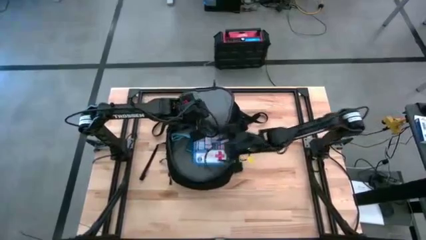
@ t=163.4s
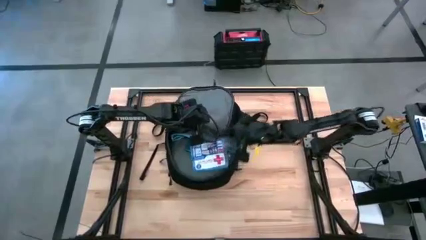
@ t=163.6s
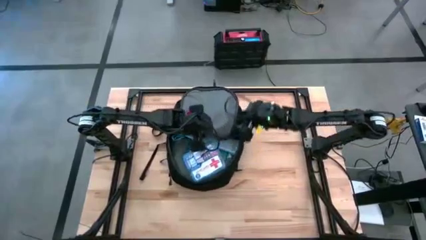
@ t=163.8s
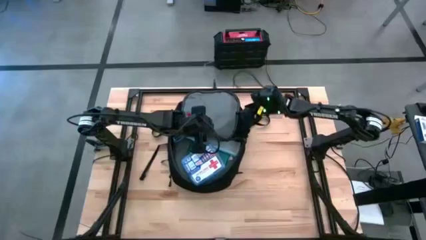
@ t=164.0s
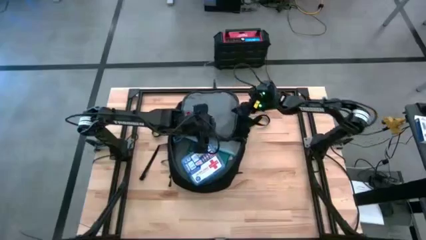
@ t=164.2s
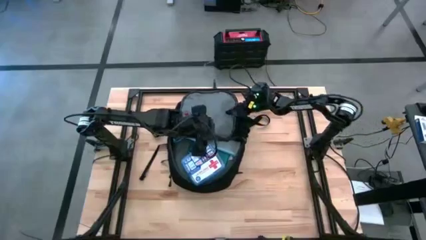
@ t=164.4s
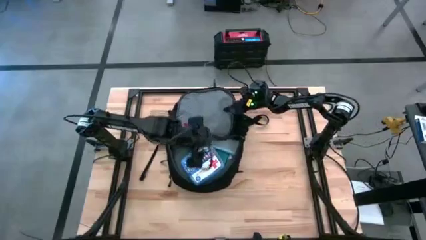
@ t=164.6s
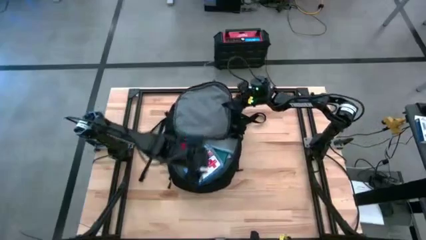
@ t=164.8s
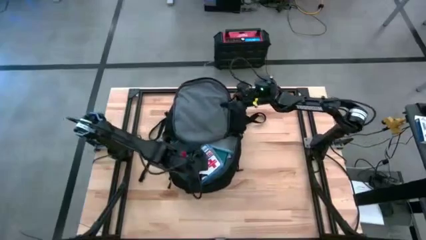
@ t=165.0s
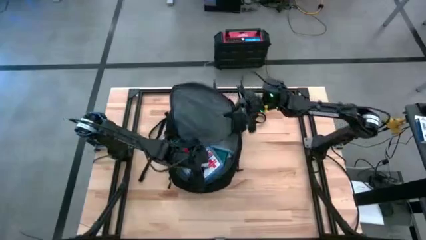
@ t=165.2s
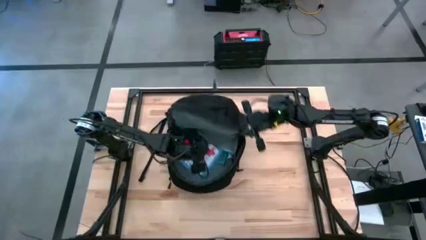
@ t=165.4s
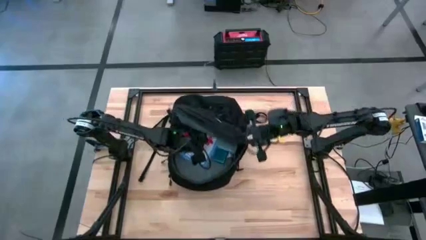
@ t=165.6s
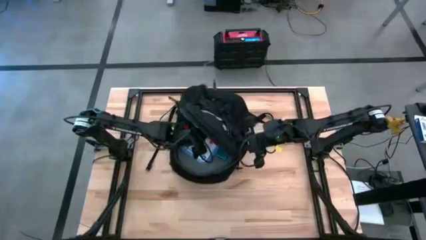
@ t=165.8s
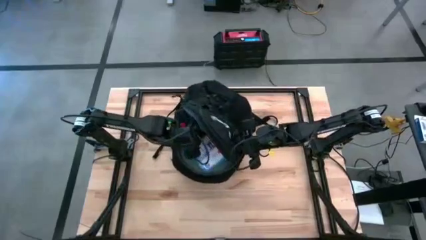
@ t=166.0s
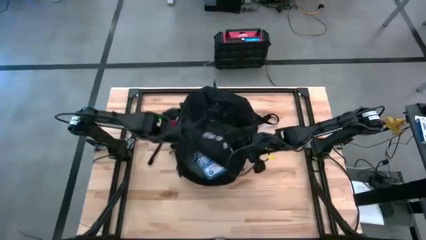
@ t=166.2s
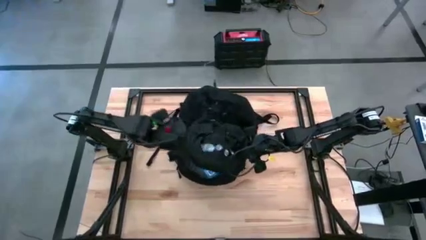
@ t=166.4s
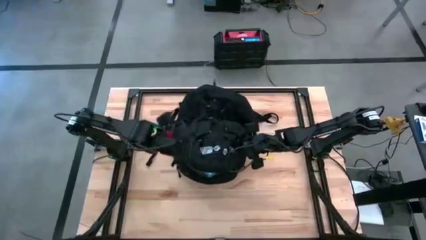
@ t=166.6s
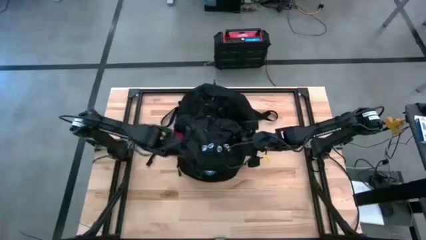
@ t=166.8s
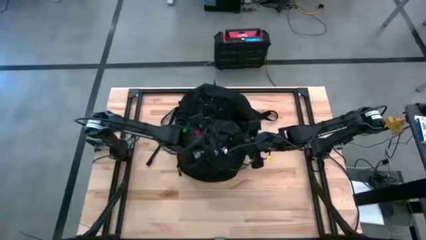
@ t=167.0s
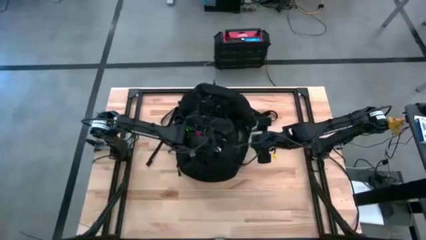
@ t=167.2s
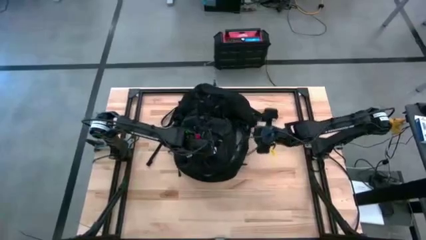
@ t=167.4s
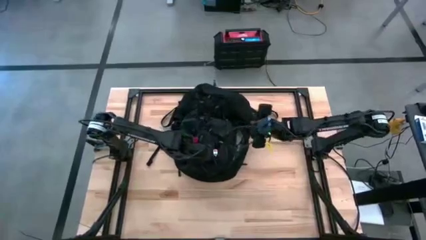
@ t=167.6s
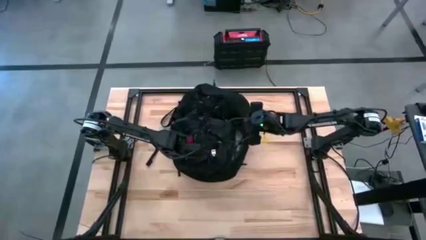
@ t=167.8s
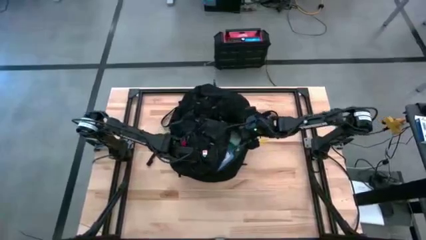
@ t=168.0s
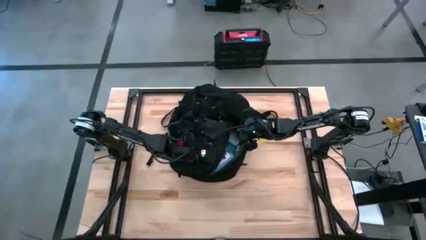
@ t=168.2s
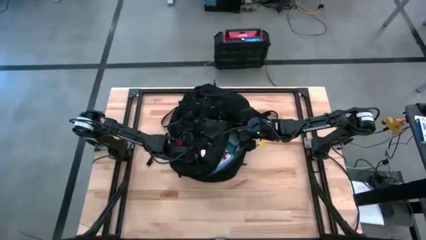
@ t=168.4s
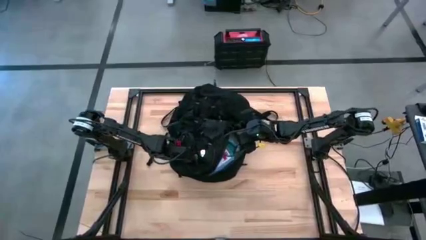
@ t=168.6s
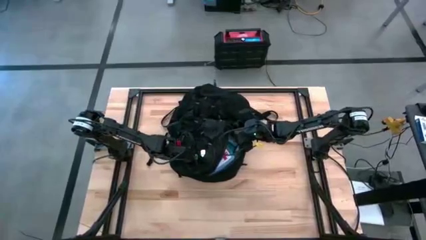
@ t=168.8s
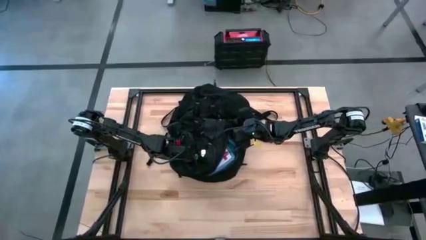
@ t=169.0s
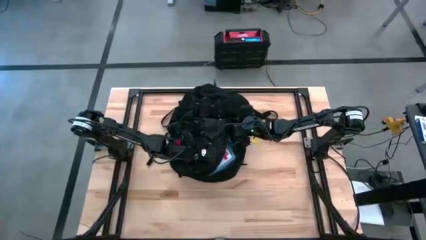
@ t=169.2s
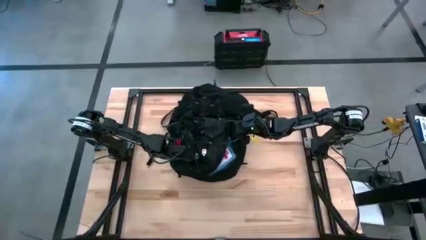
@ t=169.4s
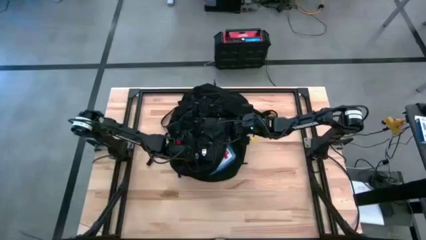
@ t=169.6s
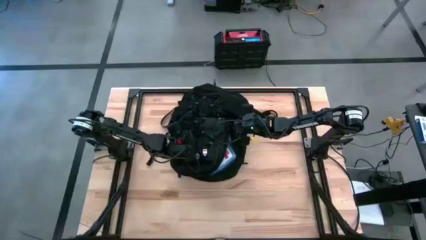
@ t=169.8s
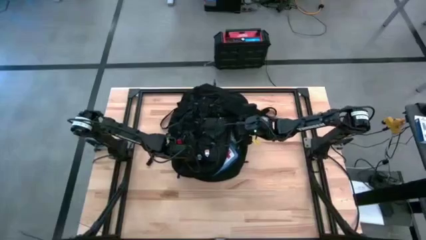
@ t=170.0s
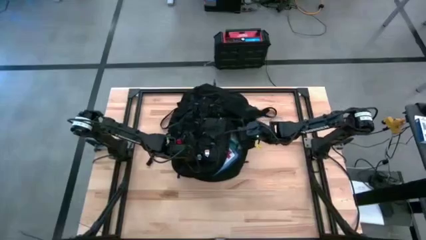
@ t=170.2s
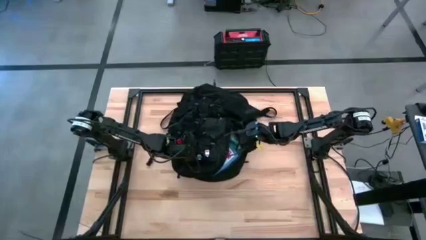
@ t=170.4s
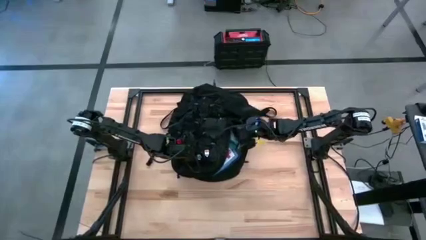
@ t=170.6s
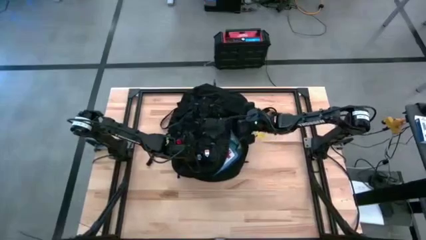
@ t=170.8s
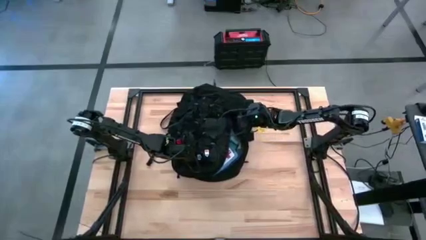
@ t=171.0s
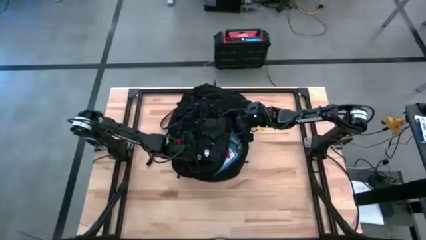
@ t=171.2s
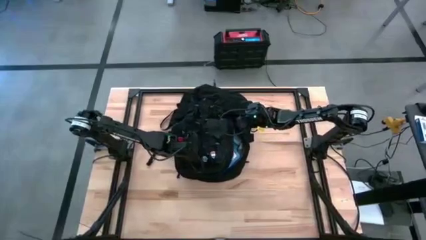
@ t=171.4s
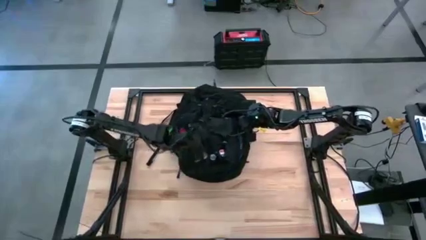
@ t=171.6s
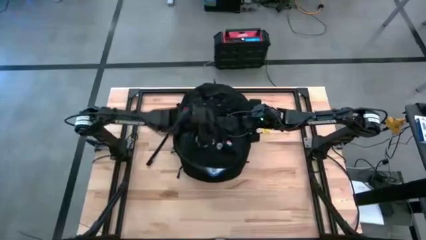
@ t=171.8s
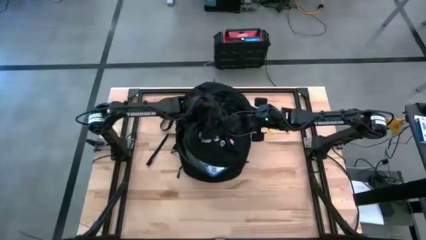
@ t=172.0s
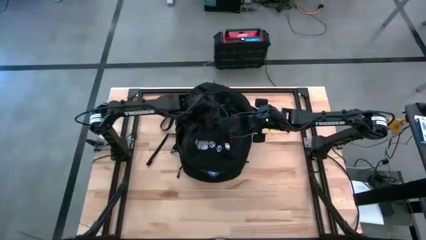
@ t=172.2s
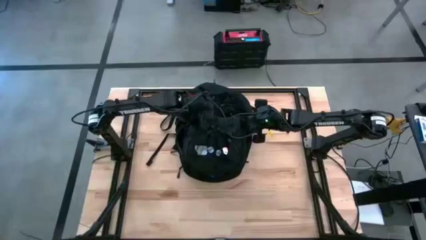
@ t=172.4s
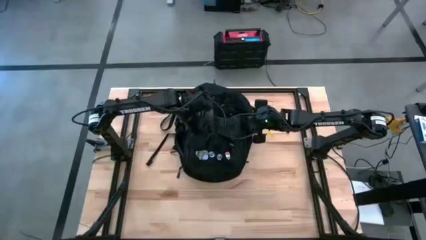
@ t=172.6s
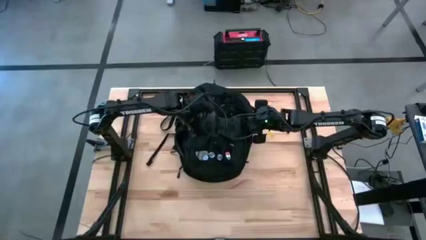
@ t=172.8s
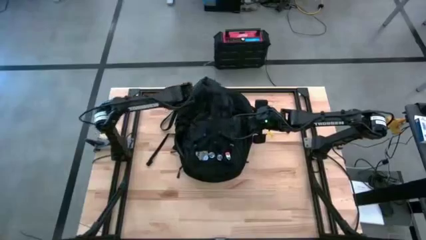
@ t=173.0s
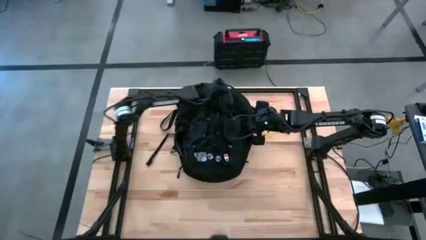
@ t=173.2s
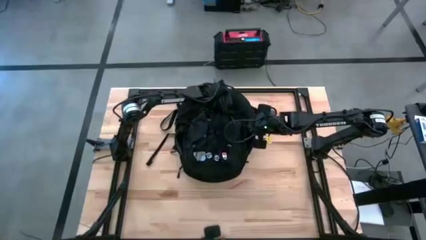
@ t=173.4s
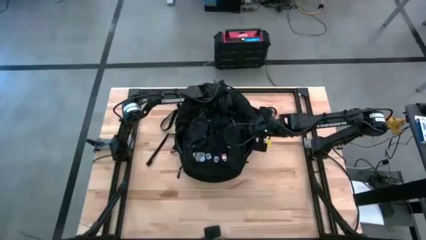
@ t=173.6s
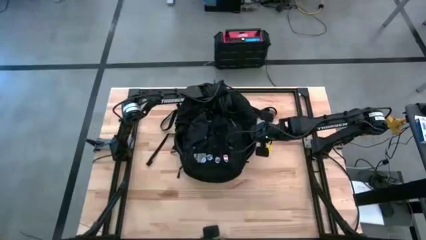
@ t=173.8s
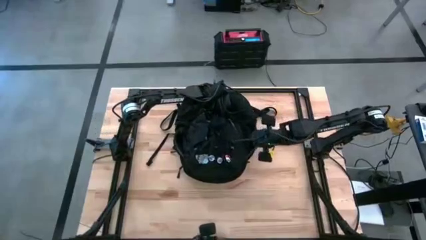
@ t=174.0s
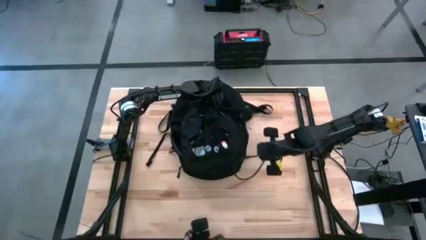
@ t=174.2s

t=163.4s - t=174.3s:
Task: Unpack backpack
Close the black backpack

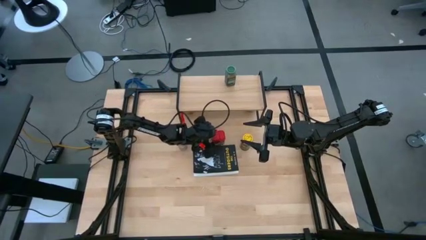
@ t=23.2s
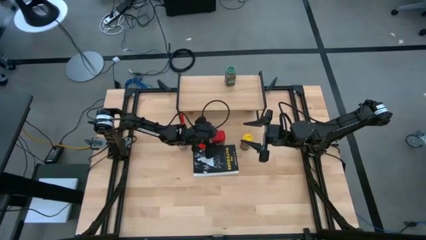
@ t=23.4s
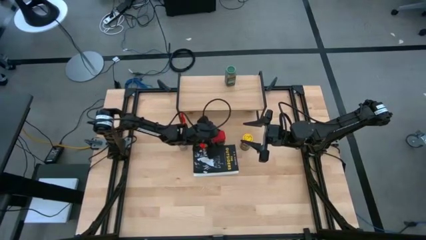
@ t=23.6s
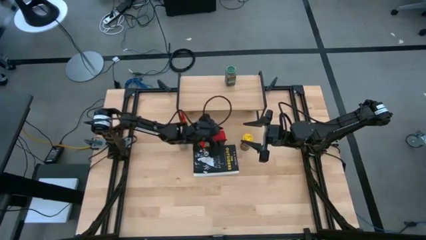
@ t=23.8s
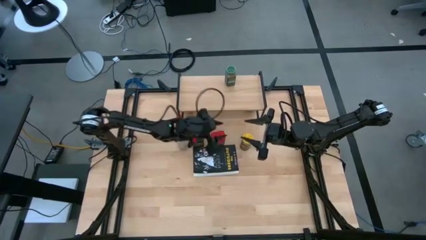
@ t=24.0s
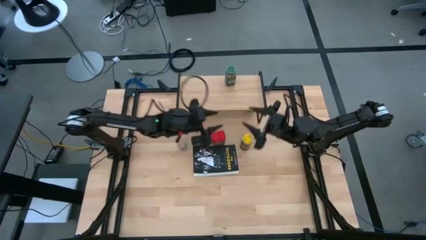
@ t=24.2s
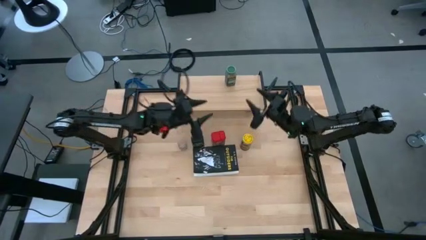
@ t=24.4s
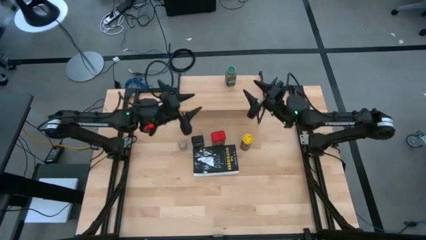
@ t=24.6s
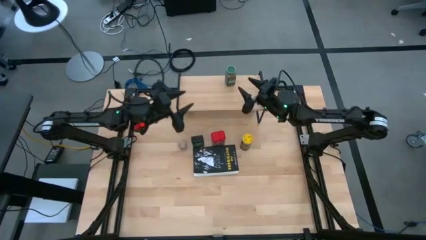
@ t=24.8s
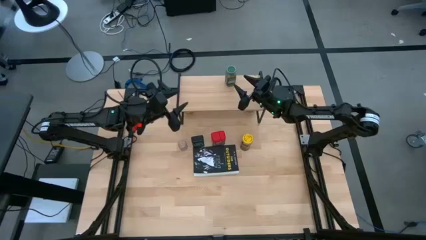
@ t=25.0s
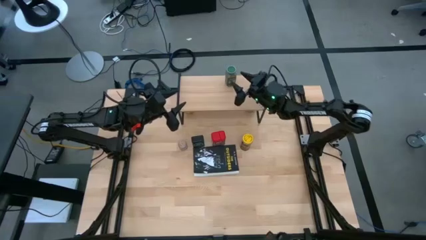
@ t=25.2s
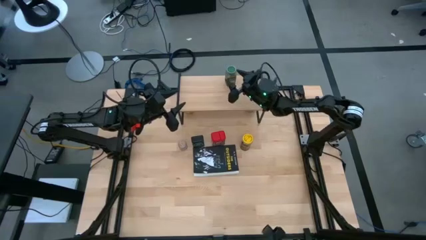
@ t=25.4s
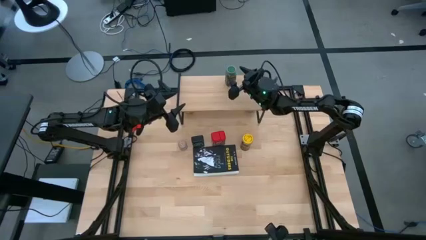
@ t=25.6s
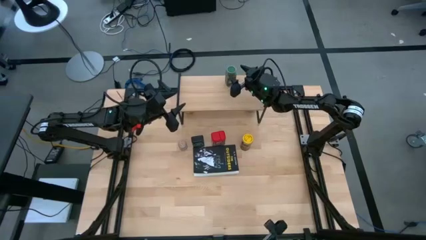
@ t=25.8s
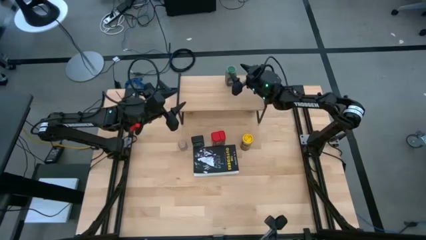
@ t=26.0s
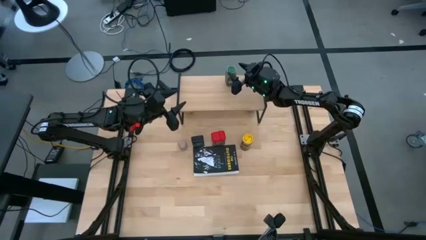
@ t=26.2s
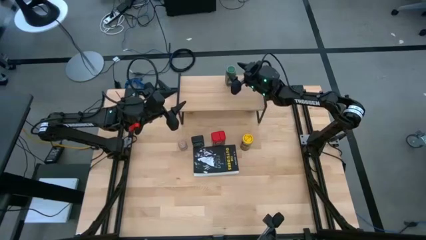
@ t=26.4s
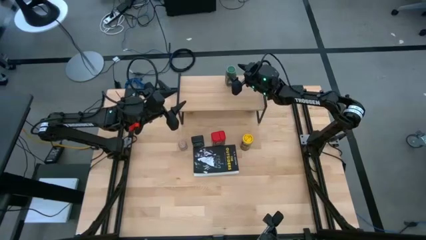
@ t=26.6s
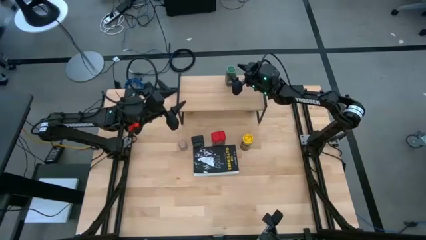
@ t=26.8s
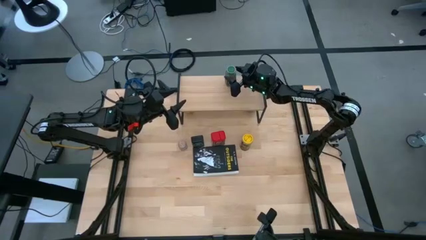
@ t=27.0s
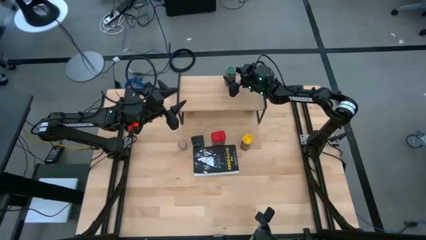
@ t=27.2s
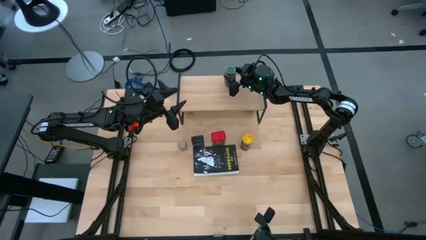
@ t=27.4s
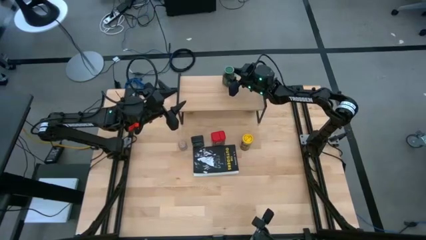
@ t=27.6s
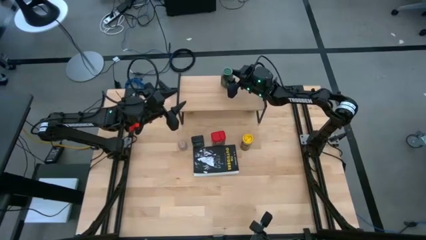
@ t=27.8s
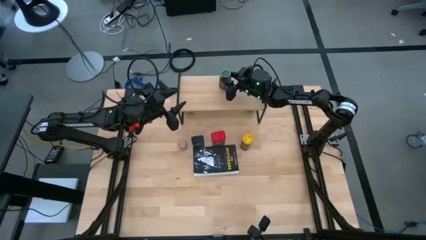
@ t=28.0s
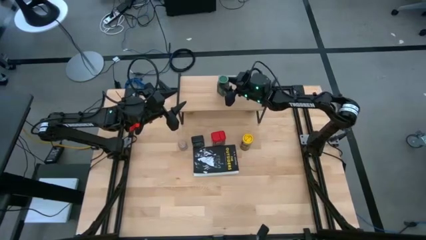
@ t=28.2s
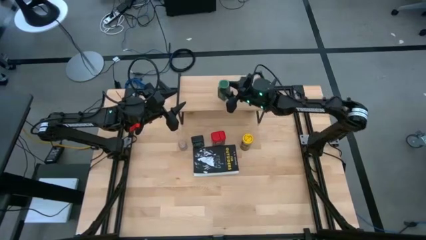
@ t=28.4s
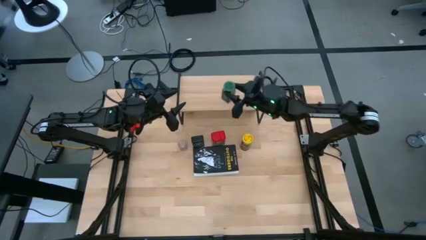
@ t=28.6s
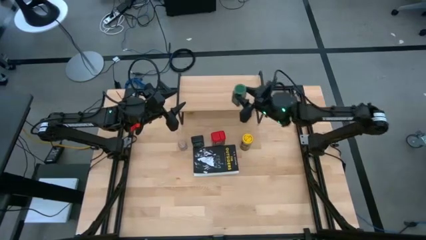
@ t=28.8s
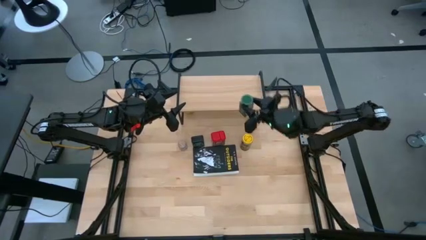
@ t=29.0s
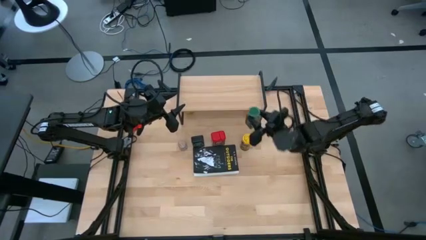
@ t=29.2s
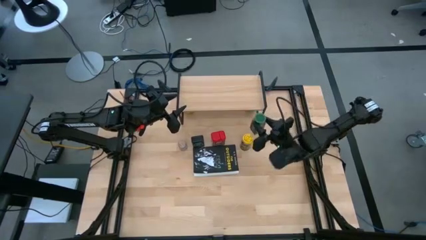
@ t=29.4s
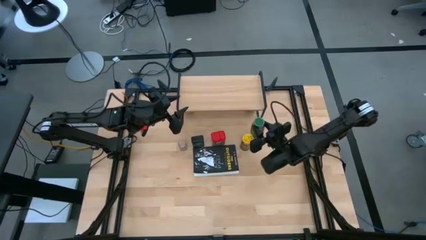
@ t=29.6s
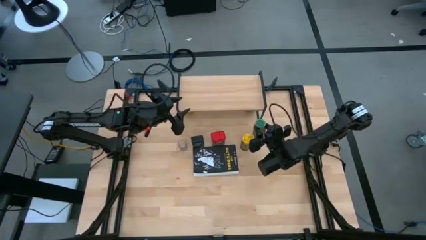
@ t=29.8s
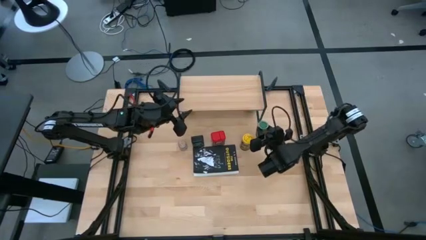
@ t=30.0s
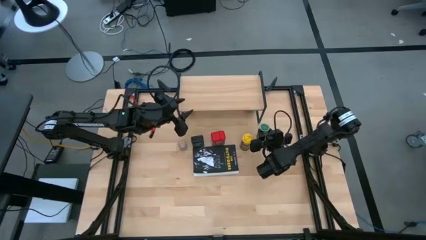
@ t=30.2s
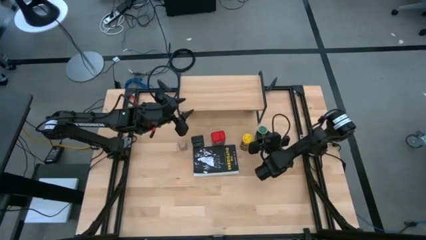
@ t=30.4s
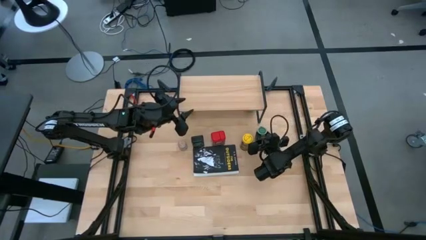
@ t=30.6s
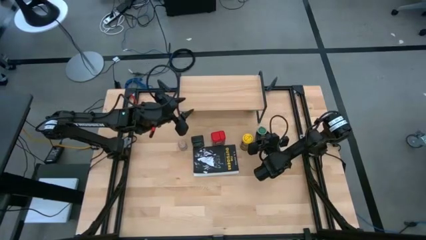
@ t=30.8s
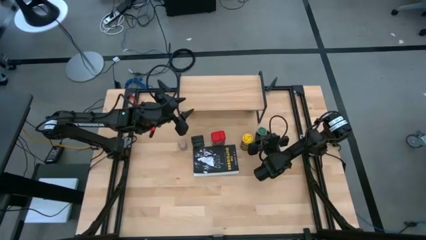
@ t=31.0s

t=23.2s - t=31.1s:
Task: Shelf spices
Remove the green seasoning bottle from the shelf
